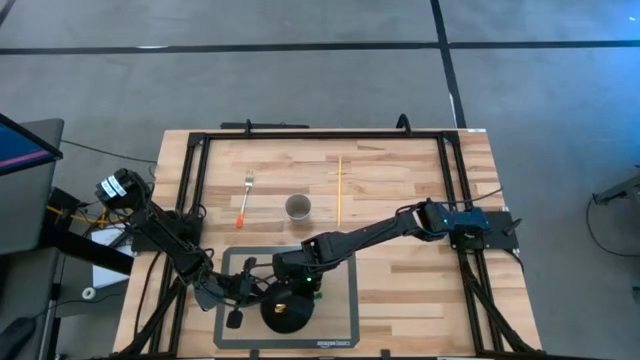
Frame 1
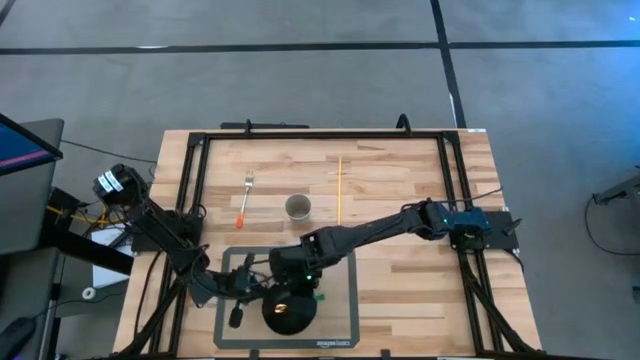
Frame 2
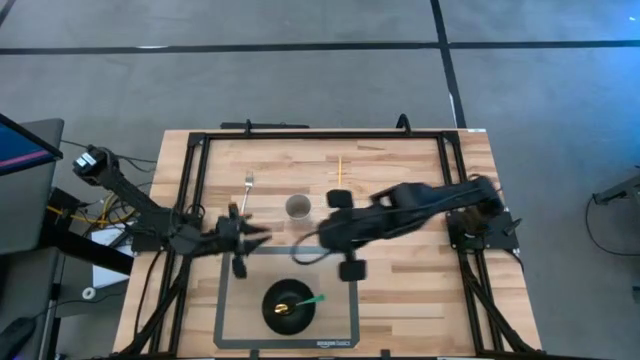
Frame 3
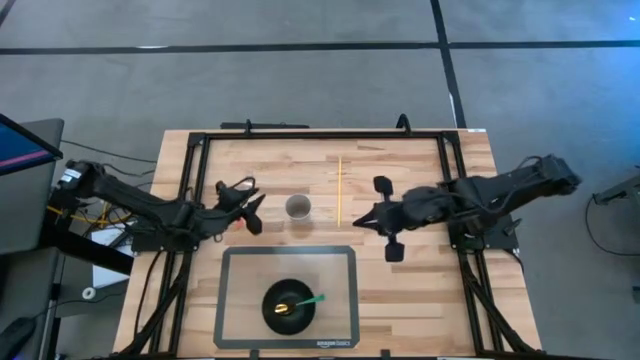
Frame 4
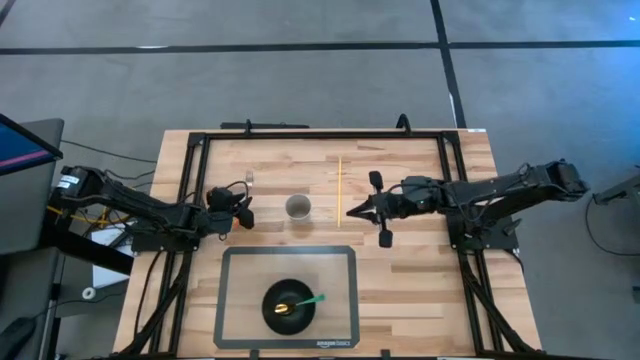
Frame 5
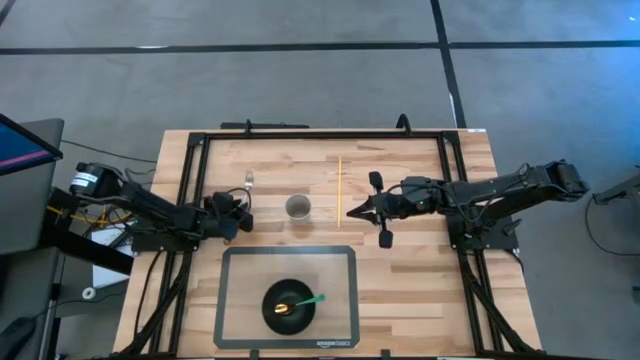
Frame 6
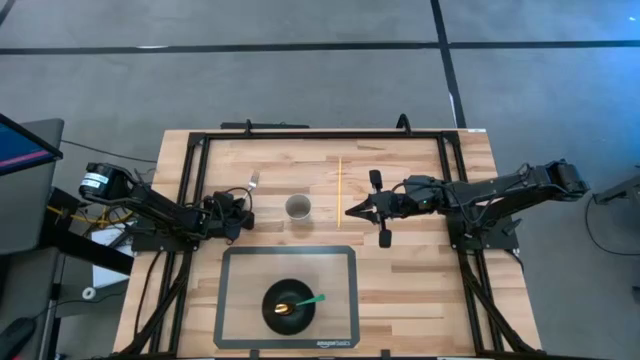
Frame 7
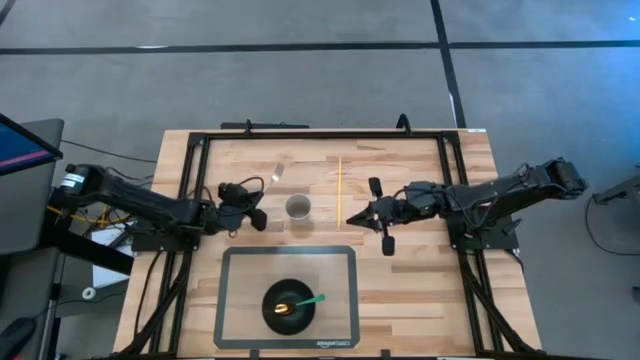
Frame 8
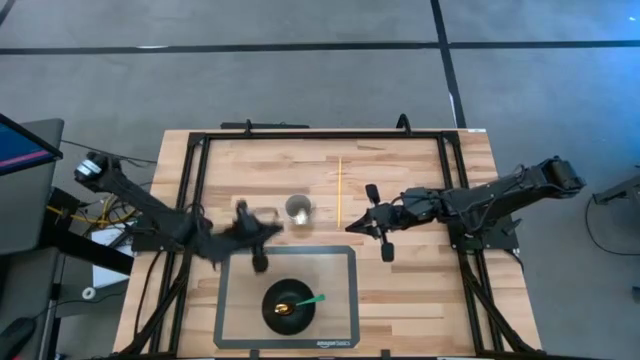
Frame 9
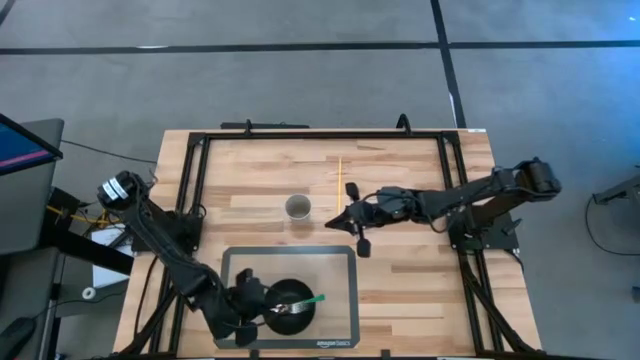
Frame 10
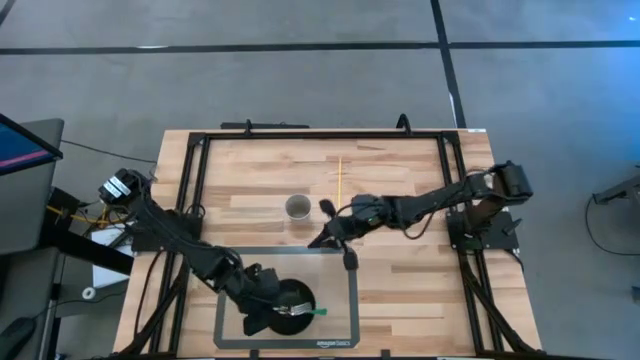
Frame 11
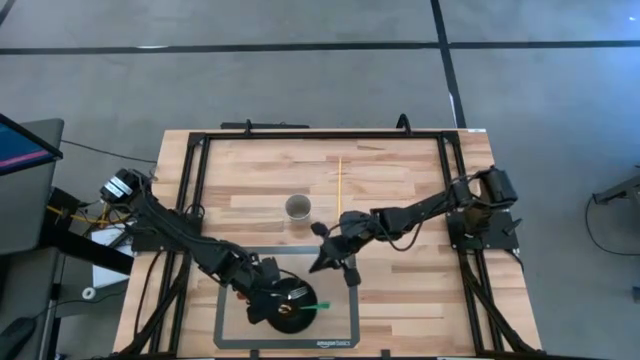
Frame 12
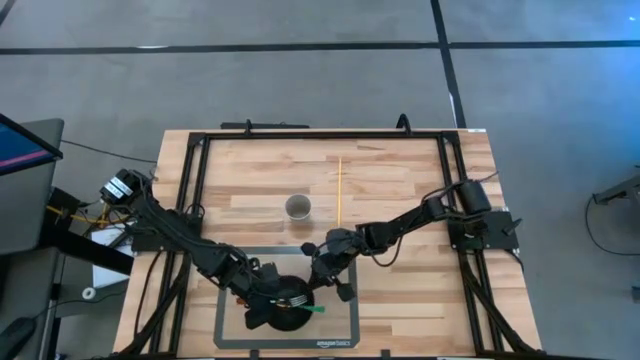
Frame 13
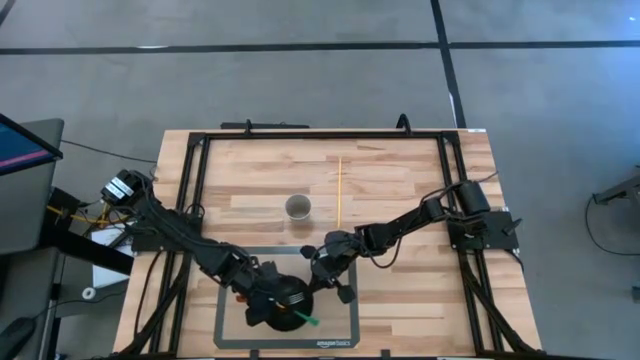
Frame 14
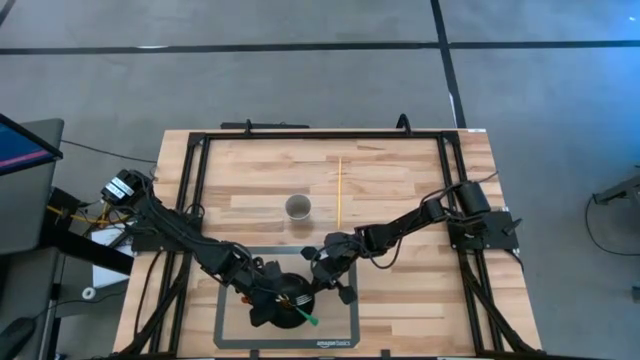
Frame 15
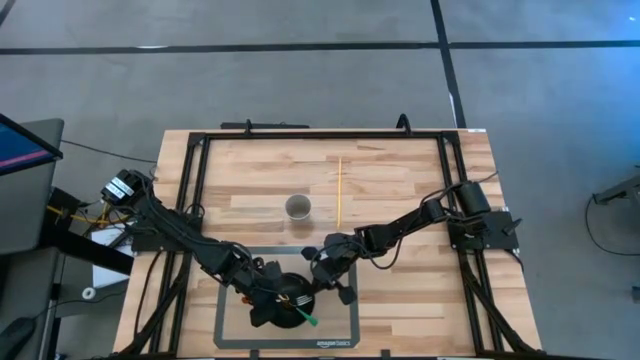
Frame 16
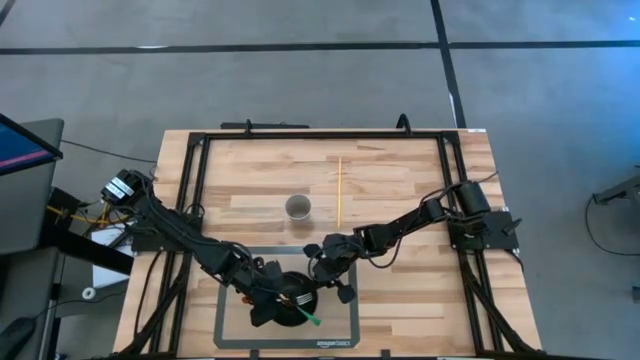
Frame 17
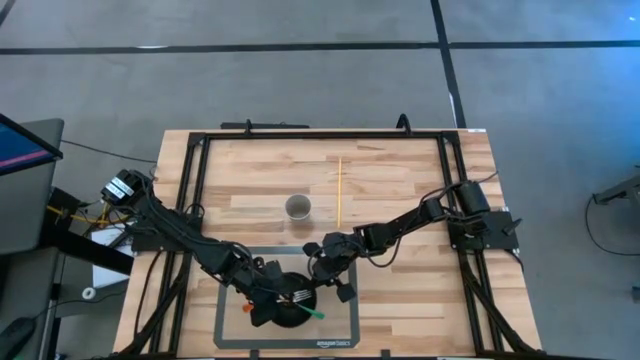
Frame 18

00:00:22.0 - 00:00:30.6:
Task: Pick & Place Utensil
Put the orange fork into the black bowl

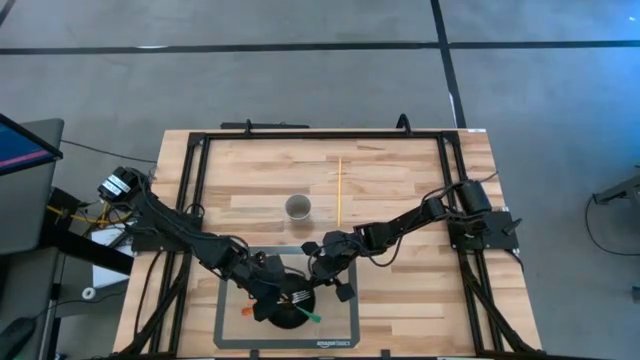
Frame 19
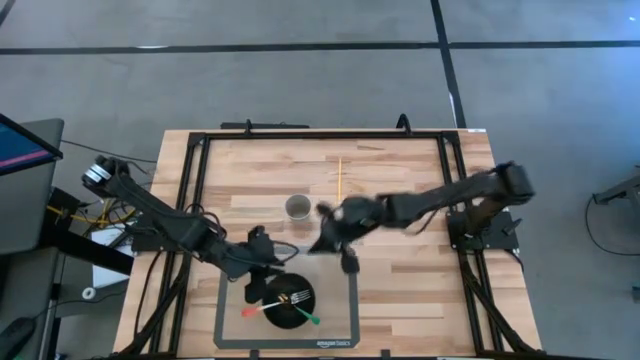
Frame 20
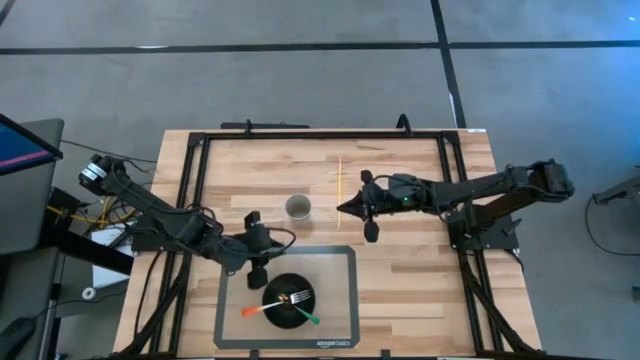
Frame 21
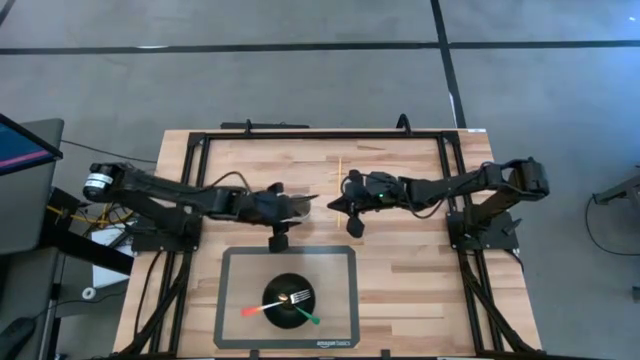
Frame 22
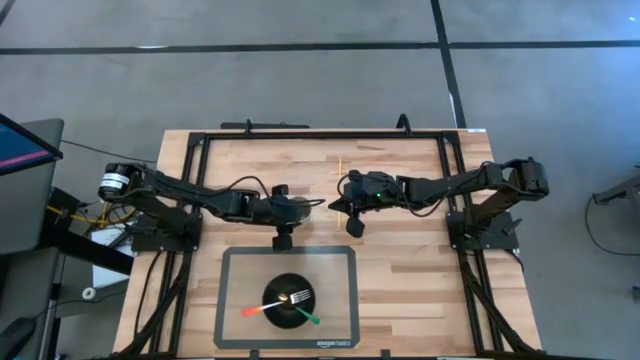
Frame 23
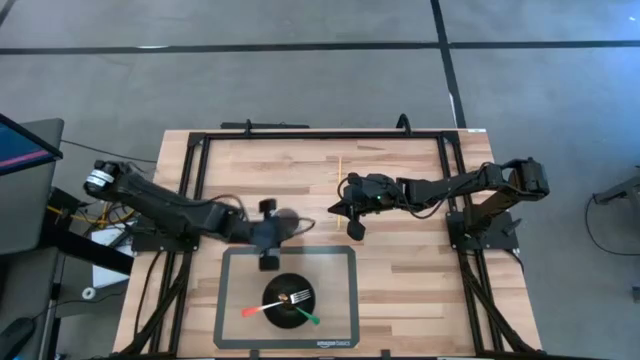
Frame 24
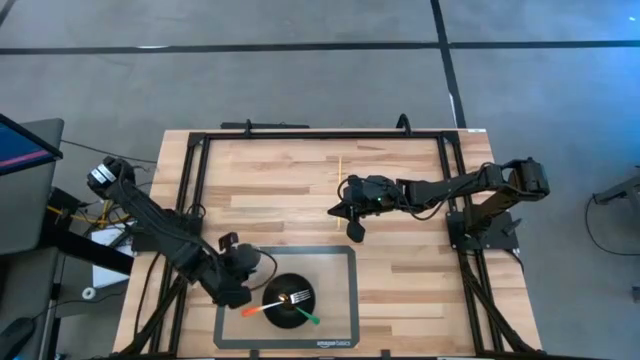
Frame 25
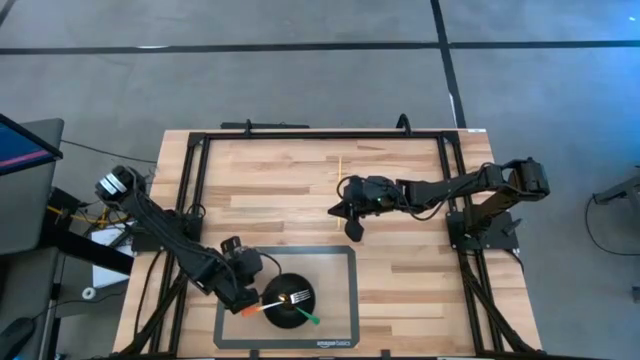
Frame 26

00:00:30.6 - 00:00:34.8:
Put the gray cup on the transparent mat to the top left of the black bowl

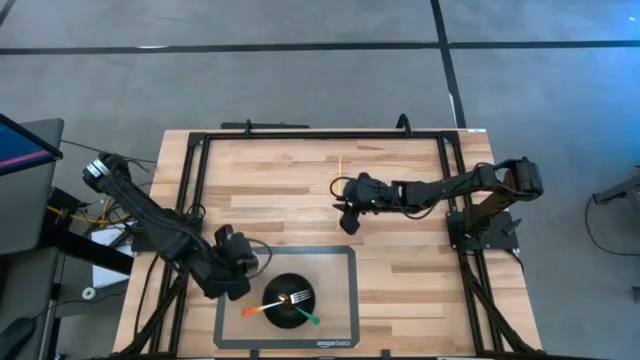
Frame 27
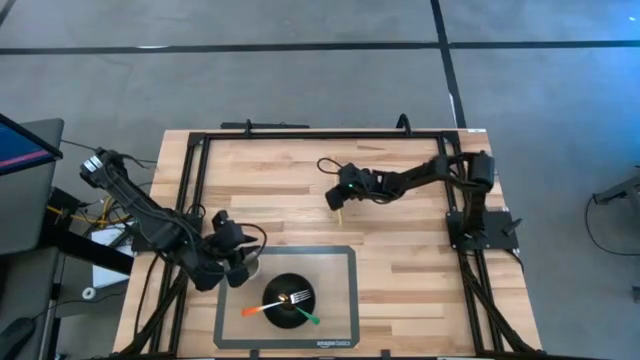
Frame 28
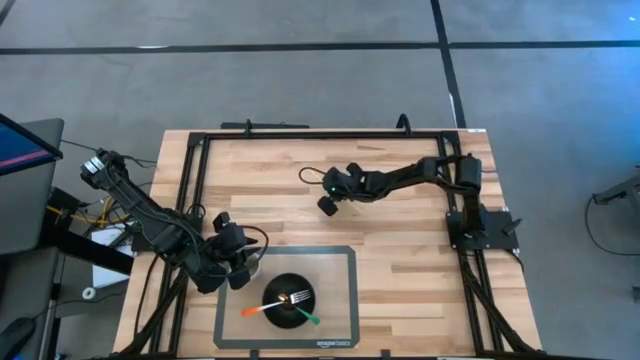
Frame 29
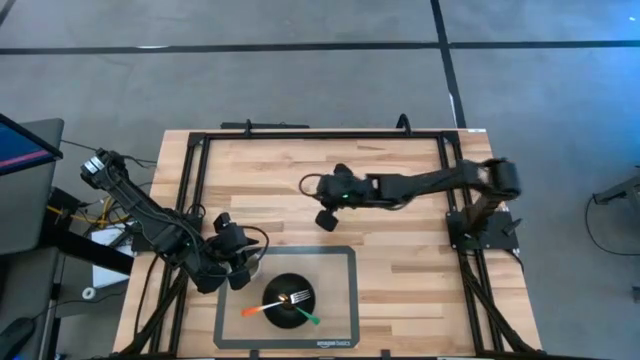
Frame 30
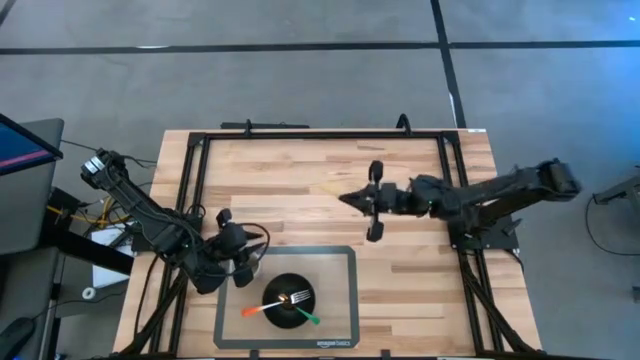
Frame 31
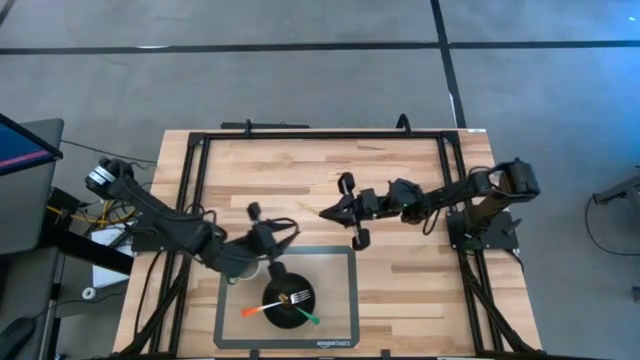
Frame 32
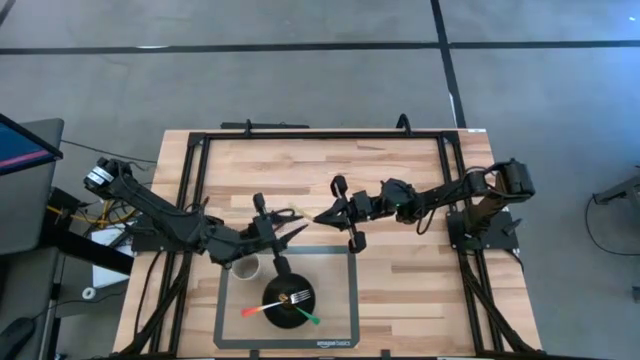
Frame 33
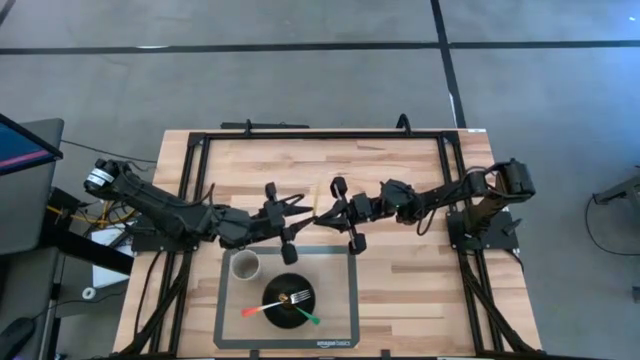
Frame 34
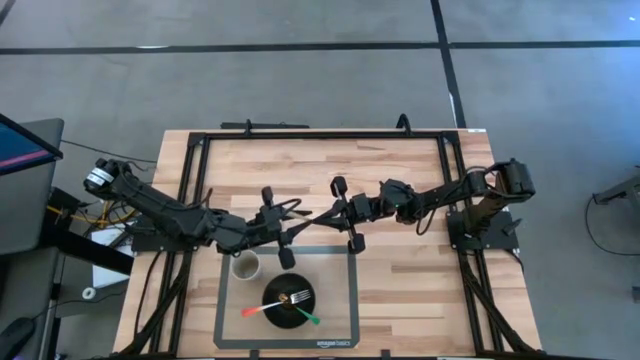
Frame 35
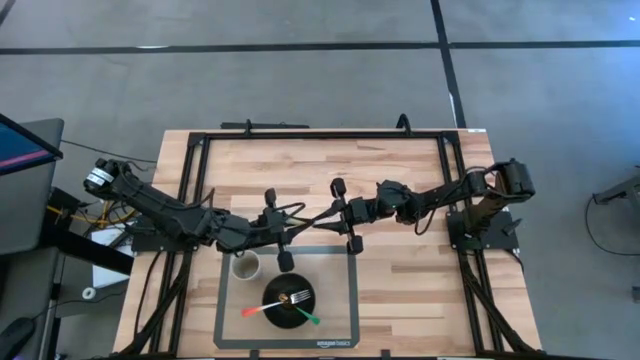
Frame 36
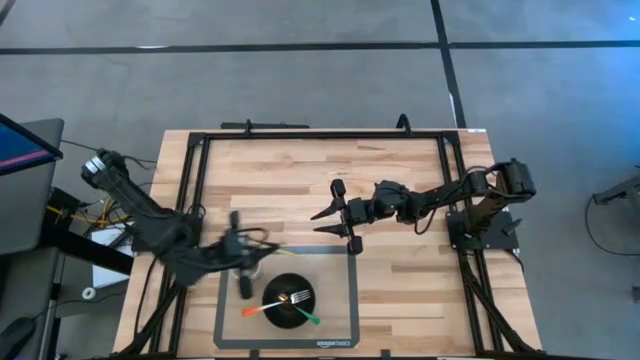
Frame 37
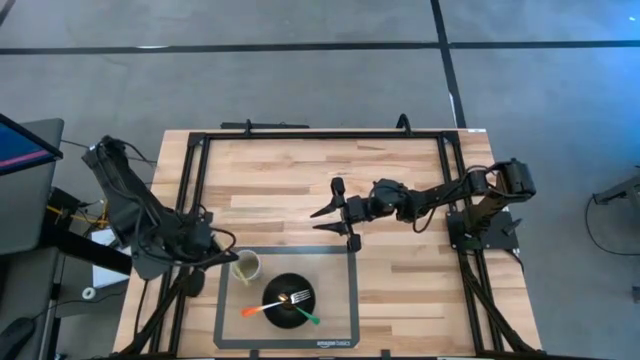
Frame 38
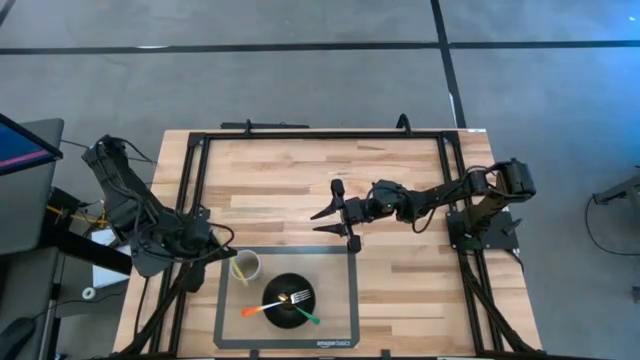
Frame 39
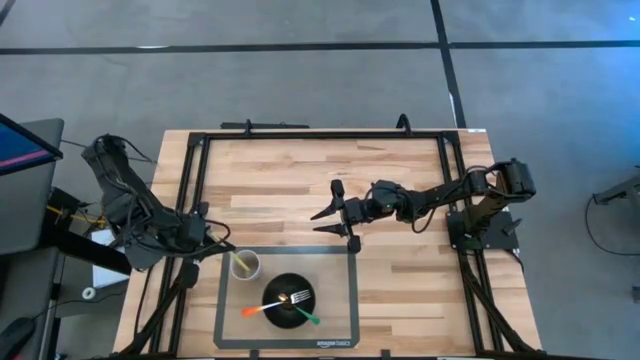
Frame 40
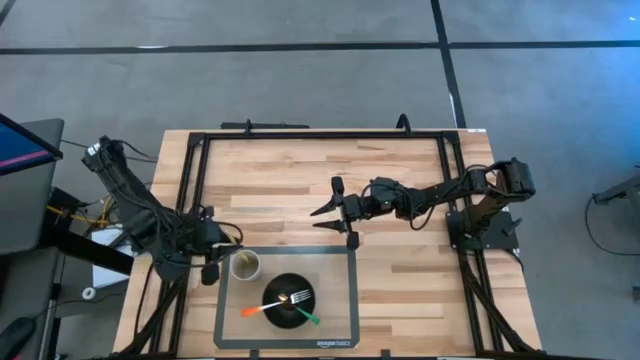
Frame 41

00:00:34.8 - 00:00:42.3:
Put the yellow straw into the gray cup

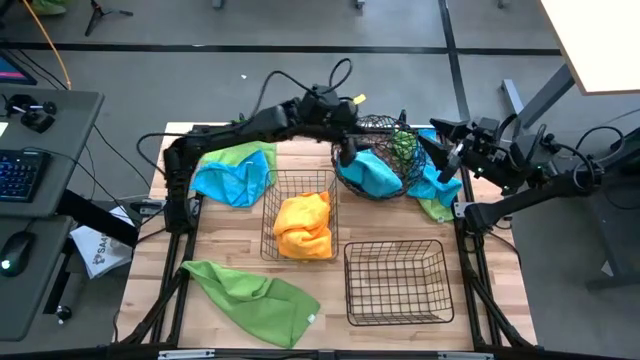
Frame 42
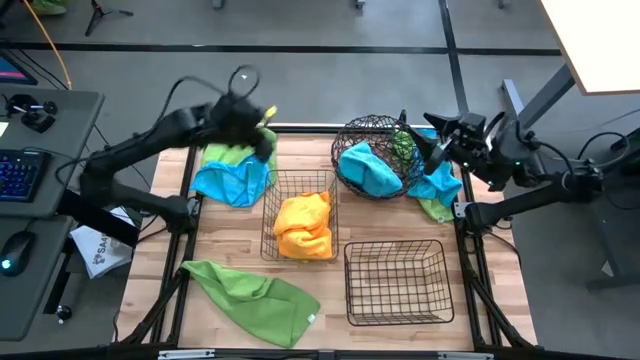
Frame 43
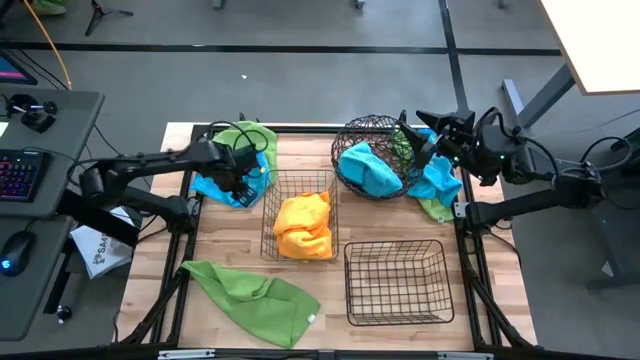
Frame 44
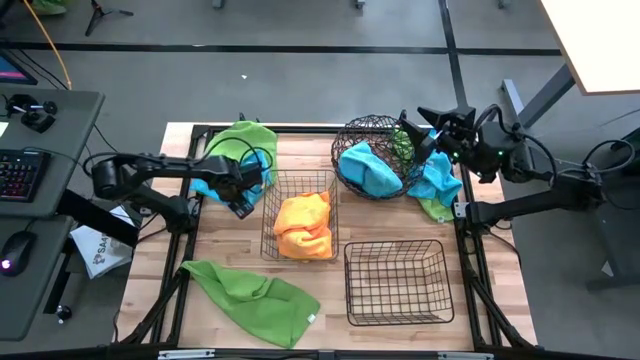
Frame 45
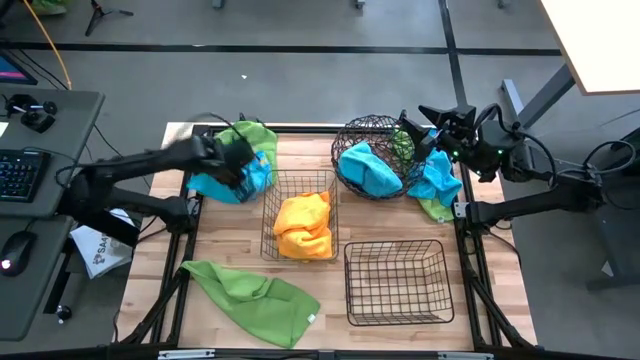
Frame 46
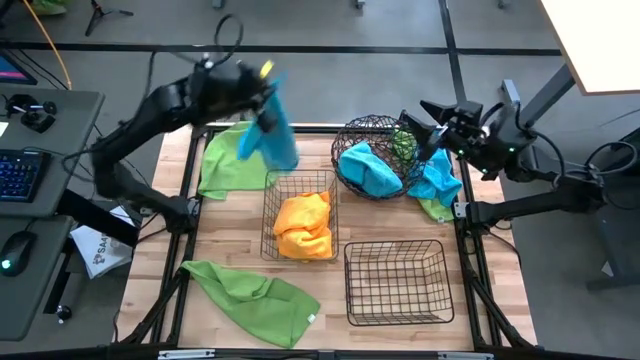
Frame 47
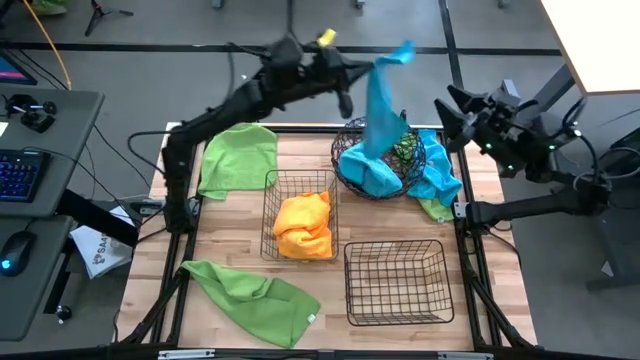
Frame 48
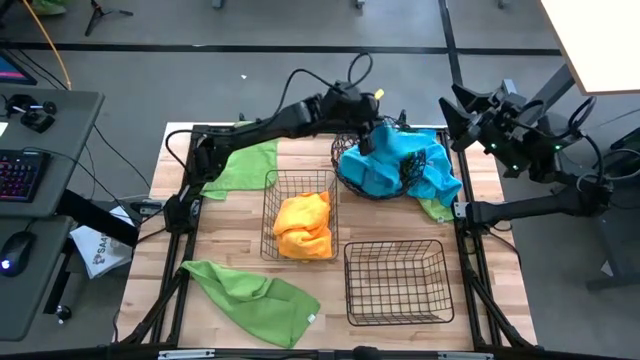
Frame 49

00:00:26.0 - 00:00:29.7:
Task: Sort microfiber towel by color & place in baskets
Put the left blue microfiber towel into the top right black metal basket
